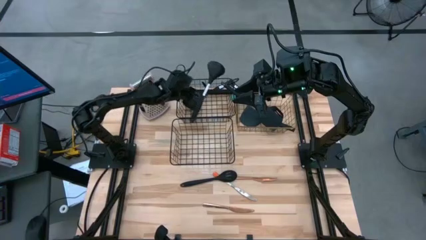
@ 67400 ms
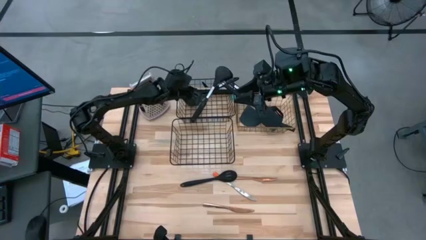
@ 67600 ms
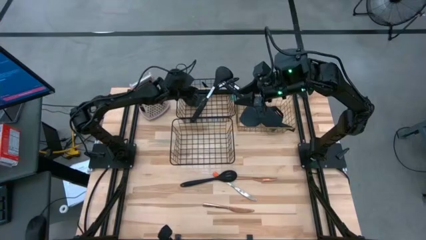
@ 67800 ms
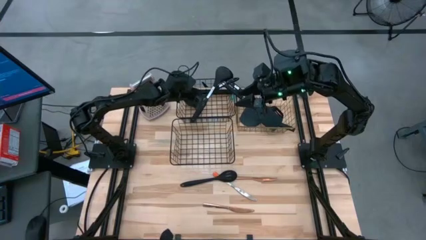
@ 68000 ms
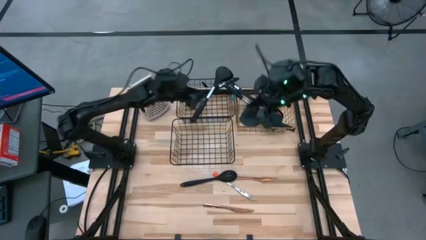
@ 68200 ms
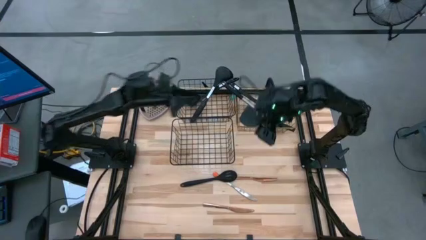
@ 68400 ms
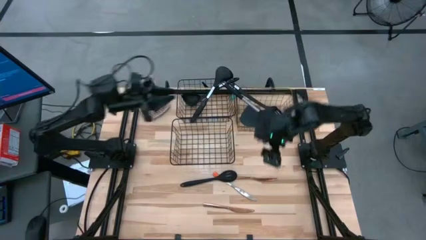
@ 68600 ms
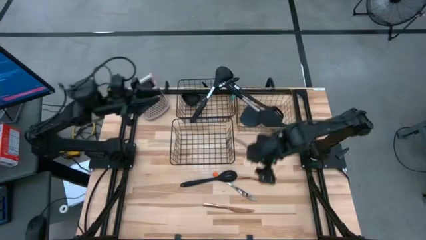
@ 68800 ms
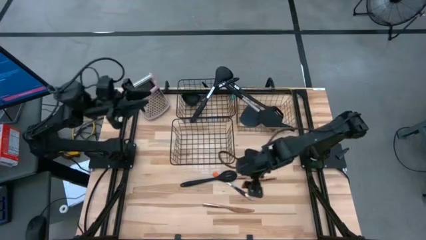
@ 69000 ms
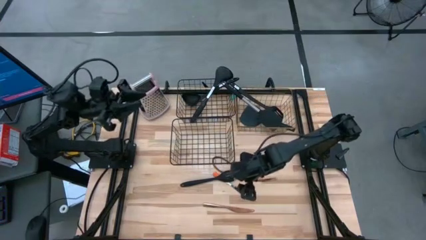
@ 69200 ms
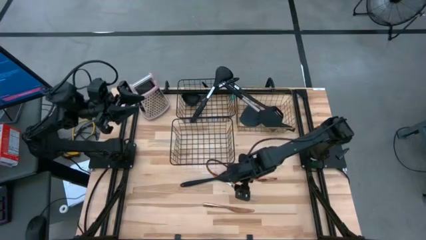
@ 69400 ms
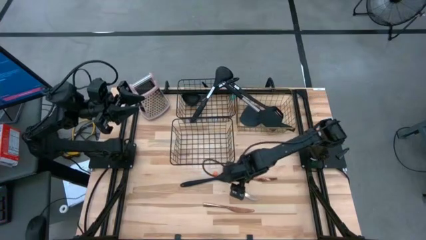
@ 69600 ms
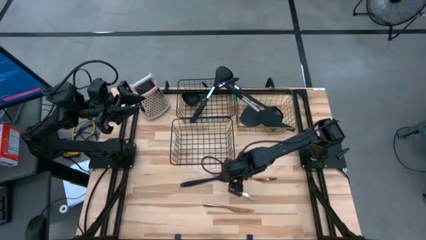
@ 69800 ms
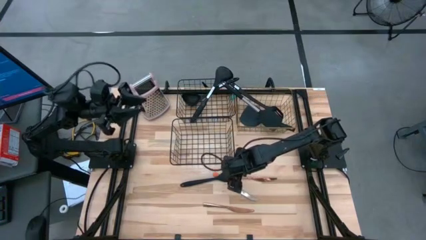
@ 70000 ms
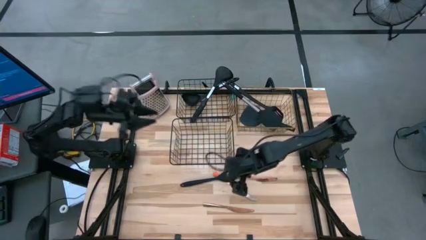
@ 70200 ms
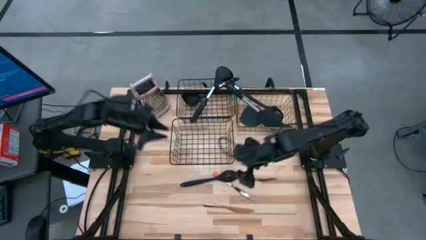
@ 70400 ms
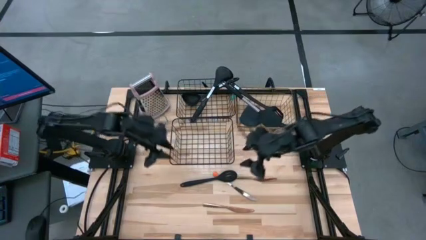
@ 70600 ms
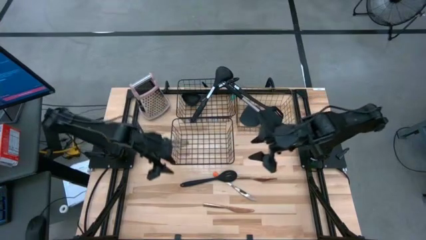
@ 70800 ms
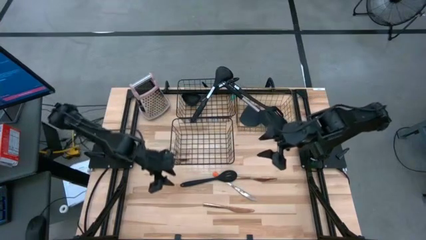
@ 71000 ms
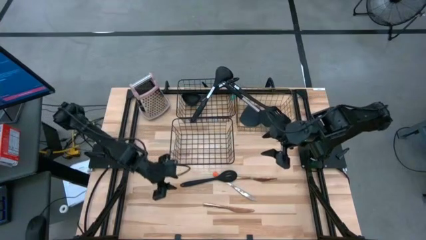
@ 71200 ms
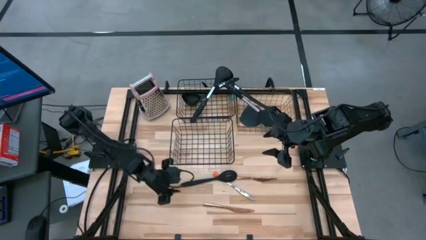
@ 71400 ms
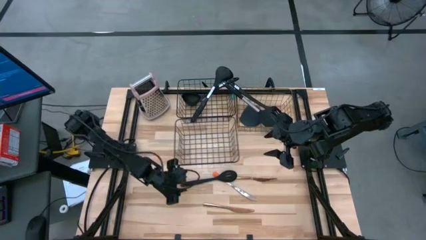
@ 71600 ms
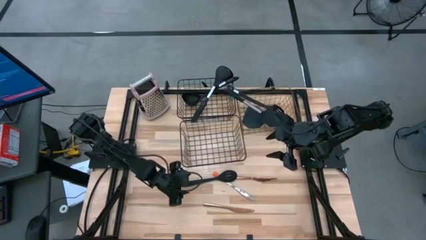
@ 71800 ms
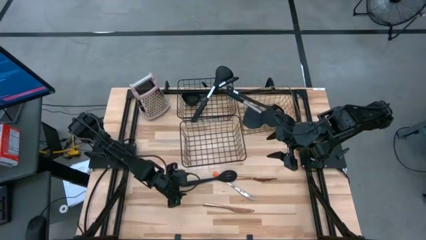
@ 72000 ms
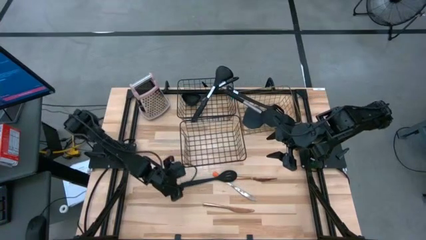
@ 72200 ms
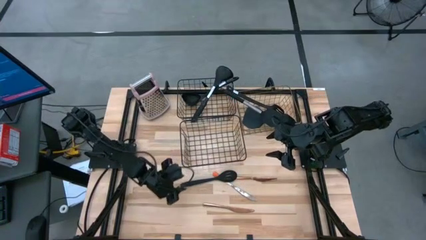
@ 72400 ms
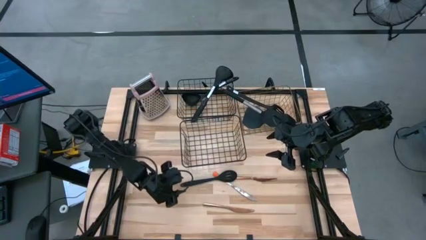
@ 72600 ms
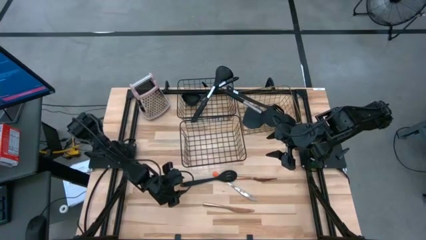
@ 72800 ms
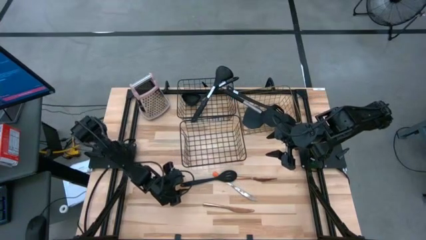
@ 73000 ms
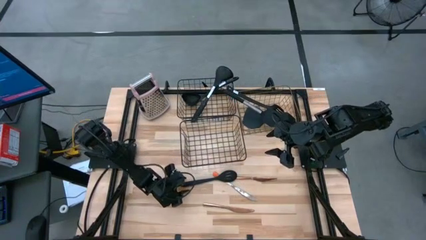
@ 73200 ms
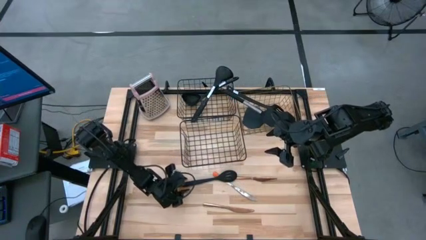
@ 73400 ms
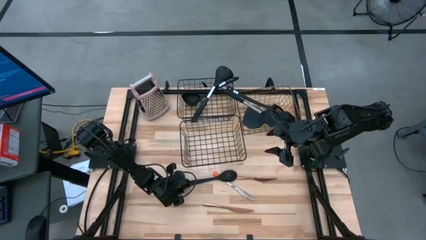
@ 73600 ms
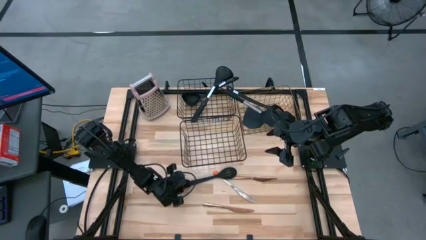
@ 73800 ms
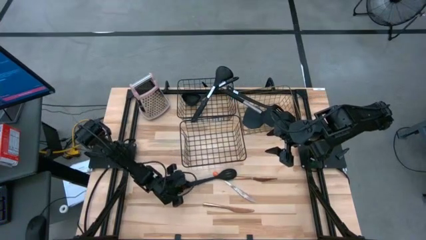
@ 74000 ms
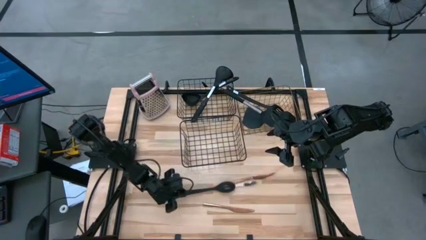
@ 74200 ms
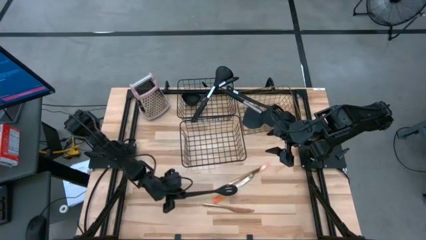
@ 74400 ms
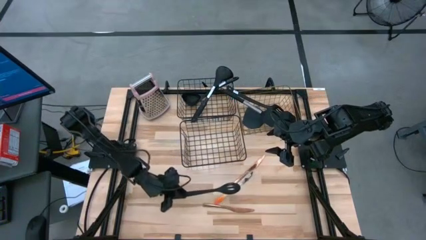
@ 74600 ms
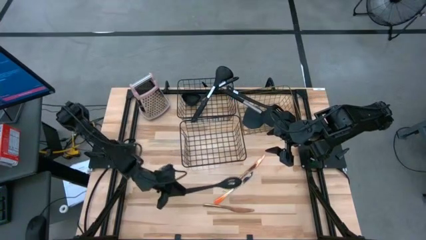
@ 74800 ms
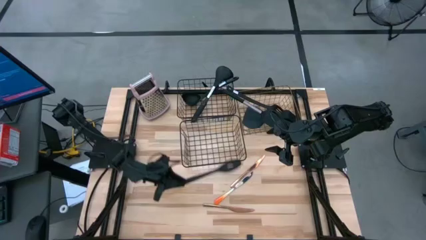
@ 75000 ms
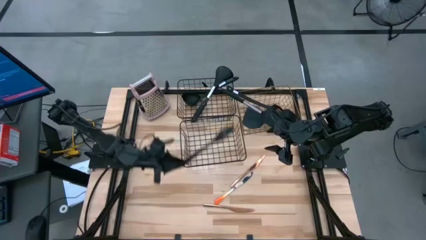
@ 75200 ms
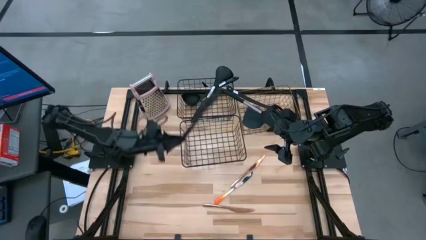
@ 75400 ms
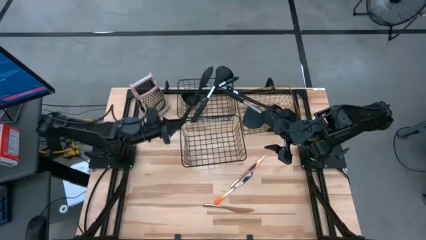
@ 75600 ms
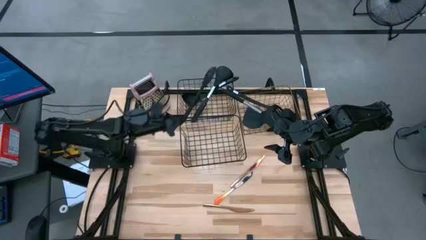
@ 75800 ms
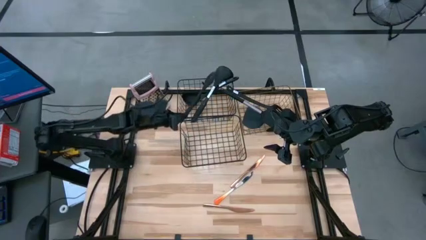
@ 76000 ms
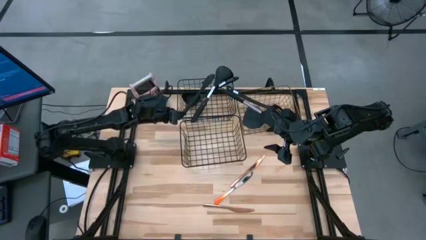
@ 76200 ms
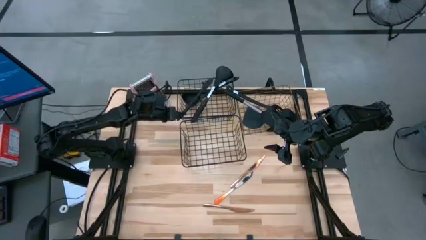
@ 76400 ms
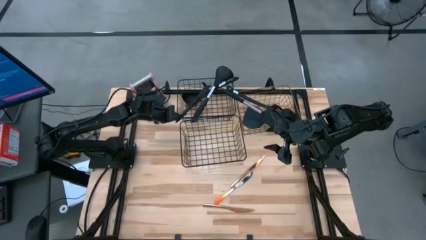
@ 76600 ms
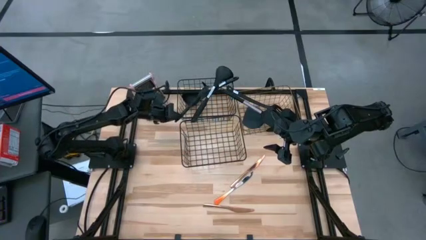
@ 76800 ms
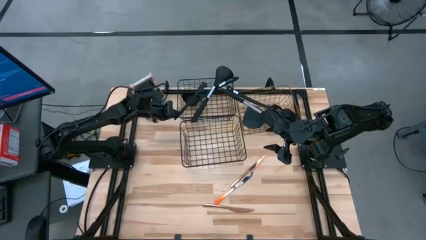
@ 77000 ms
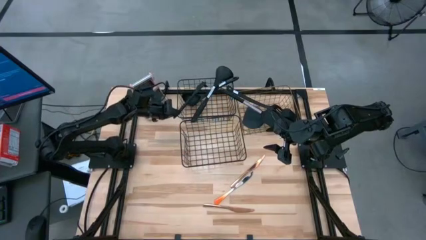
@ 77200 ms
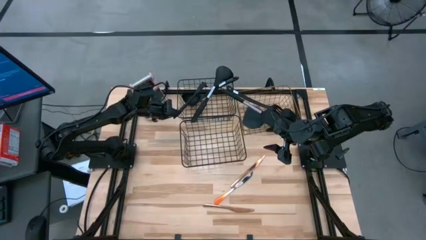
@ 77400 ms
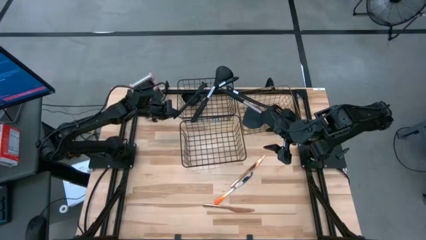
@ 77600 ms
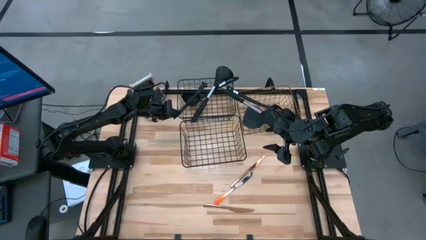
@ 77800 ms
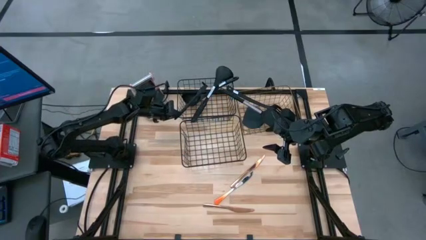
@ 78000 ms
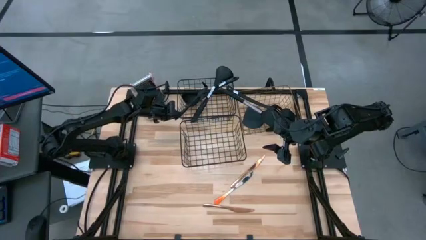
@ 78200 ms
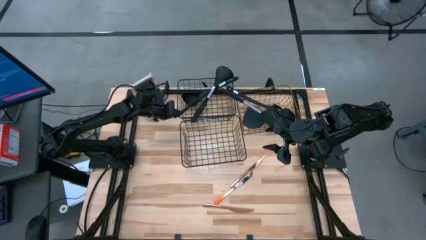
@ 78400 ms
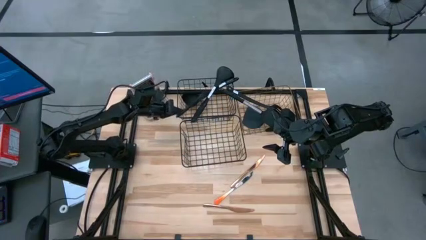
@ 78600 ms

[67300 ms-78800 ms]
Task: Pick & Place Kitchen Items
Put the slotted serving spoon into the top left wire basket

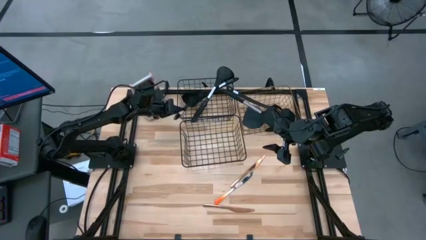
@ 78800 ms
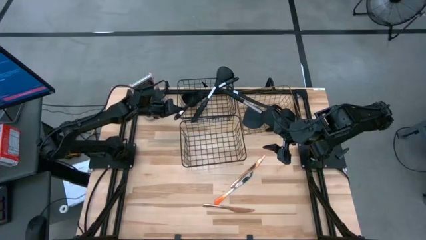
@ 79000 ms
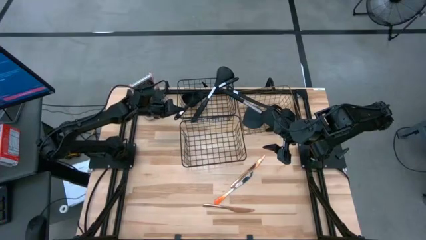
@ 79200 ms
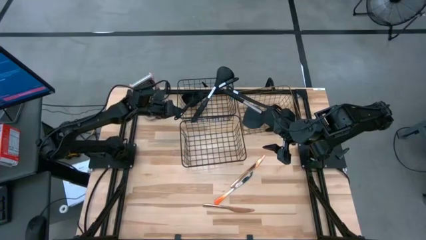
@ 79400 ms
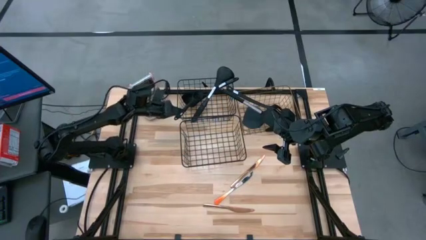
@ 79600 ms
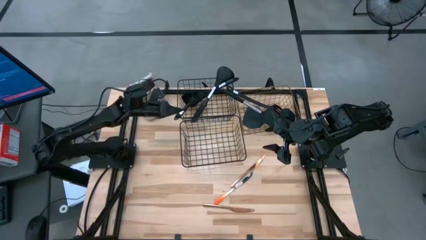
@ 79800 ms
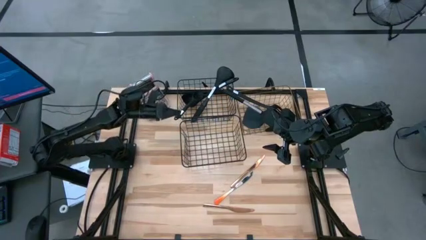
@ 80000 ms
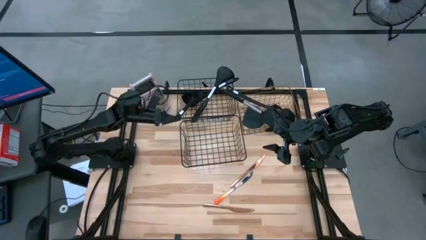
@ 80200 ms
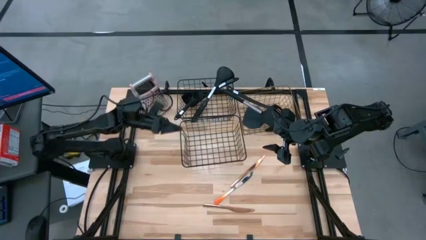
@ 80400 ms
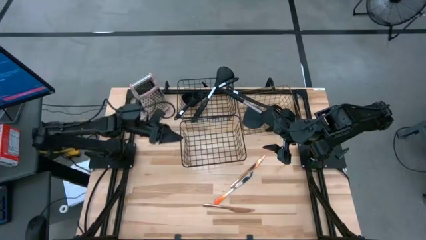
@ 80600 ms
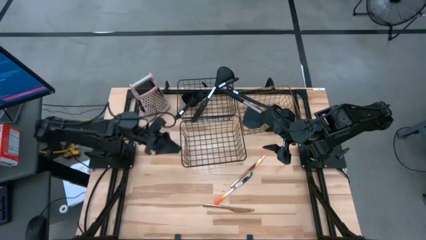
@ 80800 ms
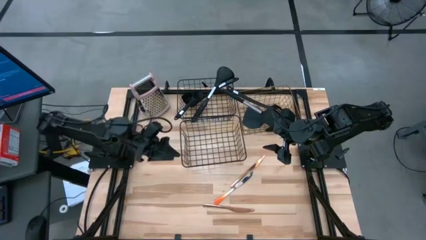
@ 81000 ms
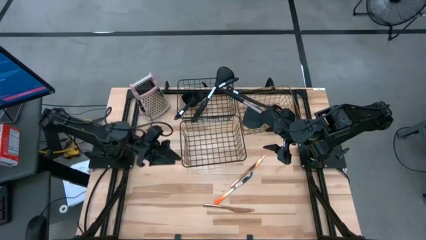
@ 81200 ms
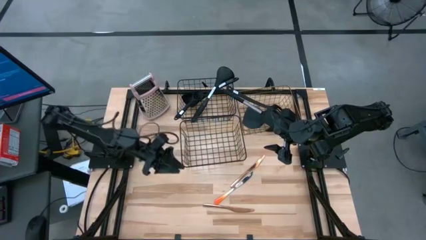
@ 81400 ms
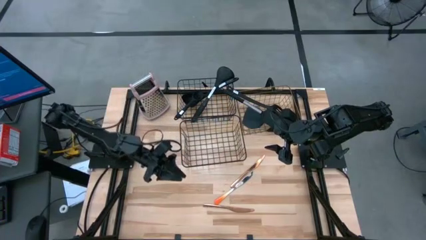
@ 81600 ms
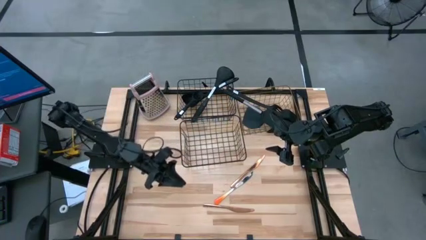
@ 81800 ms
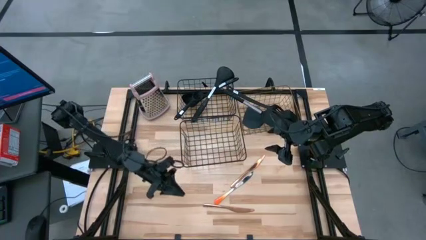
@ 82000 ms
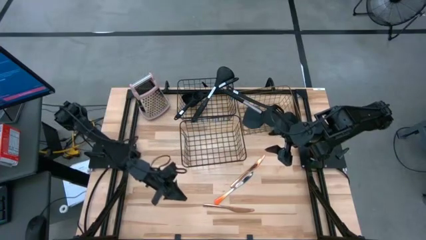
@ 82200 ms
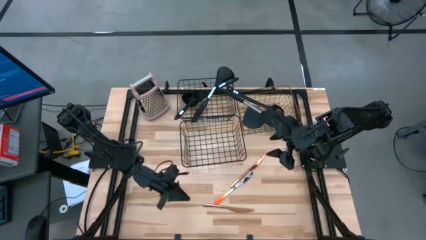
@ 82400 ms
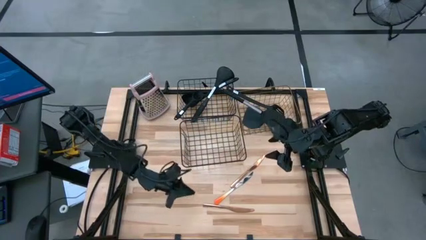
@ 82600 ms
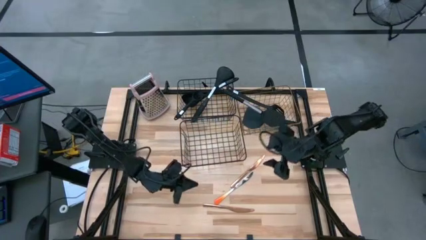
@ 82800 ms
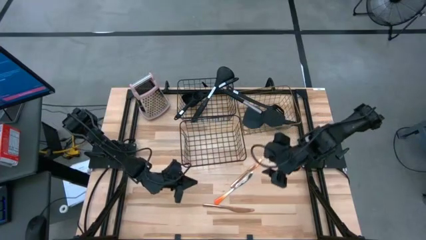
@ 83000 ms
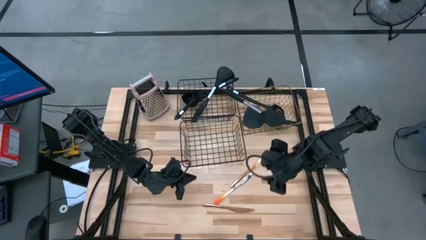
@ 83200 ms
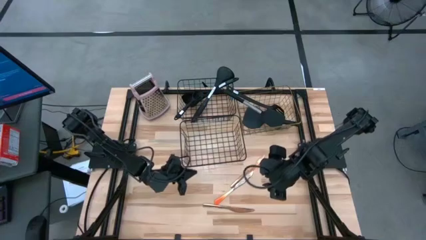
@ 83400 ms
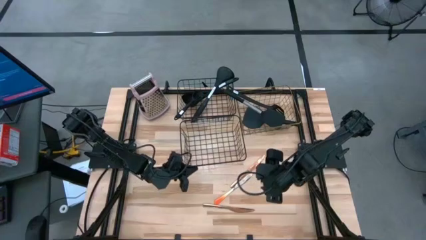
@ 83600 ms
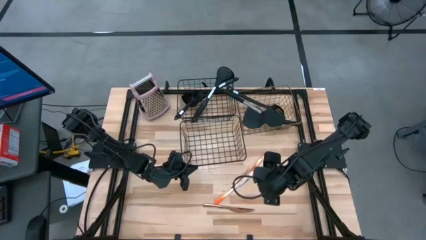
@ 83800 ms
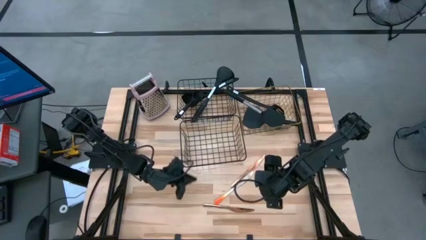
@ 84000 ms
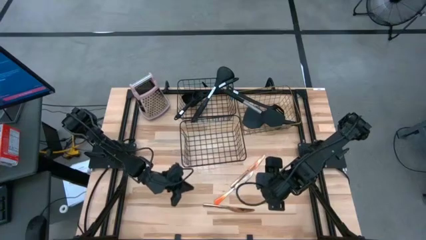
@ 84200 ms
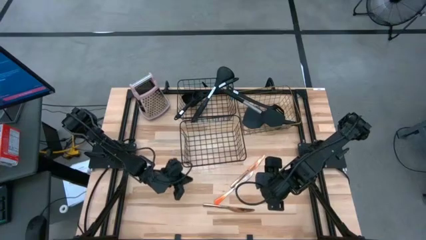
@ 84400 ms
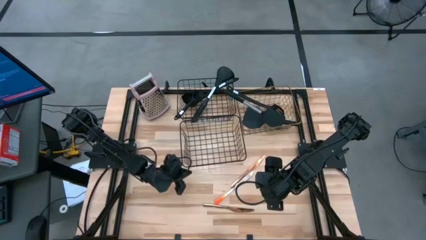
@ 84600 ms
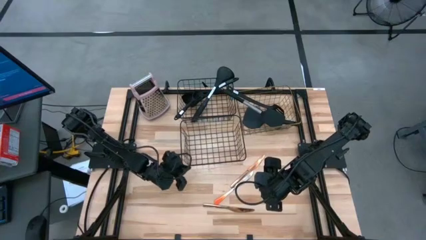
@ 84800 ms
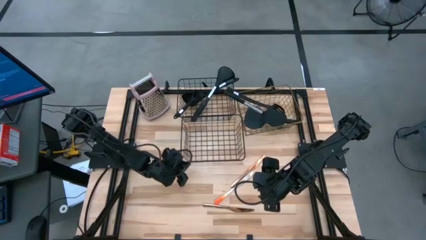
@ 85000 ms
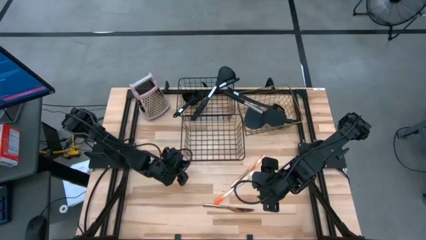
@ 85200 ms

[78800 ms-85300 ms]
Adjust the bottom wire basket on the table
